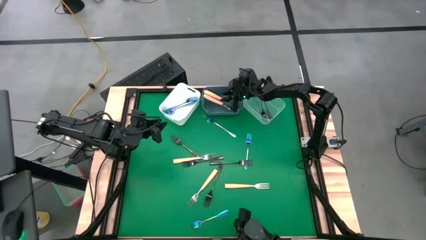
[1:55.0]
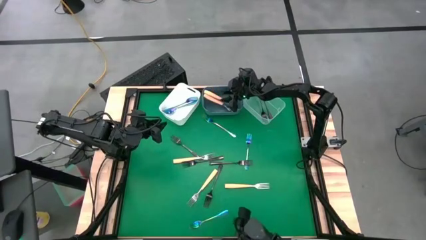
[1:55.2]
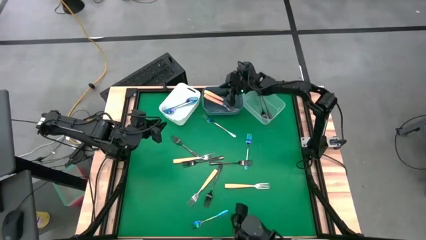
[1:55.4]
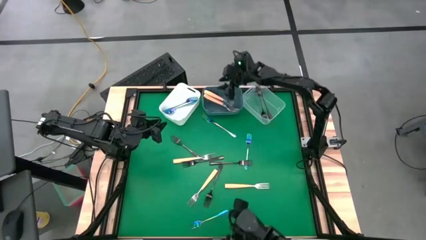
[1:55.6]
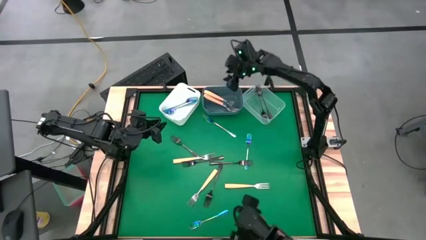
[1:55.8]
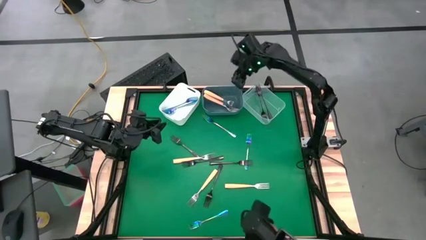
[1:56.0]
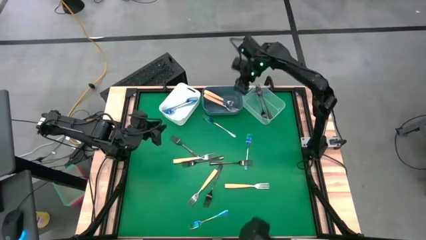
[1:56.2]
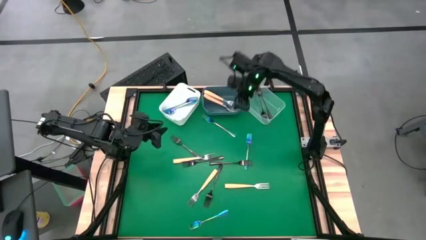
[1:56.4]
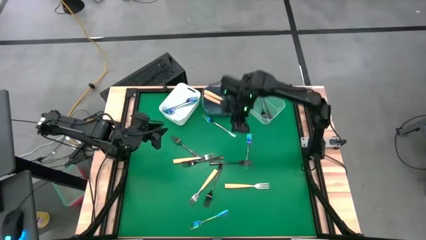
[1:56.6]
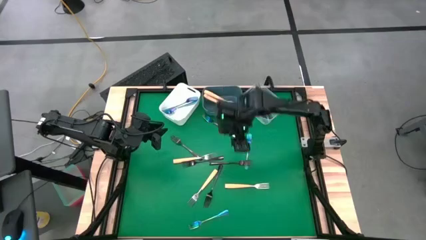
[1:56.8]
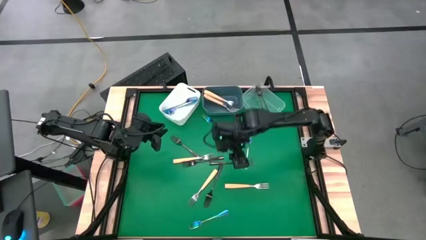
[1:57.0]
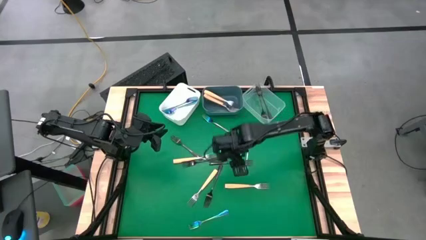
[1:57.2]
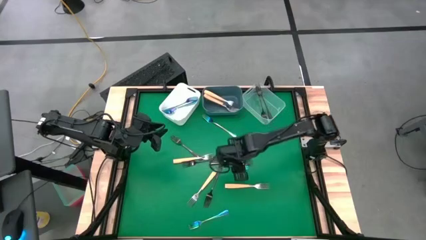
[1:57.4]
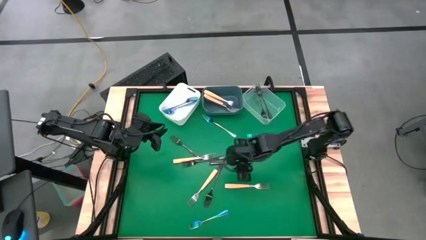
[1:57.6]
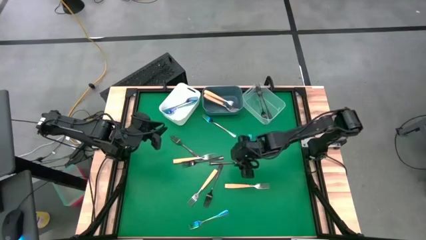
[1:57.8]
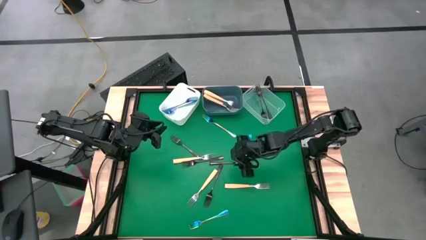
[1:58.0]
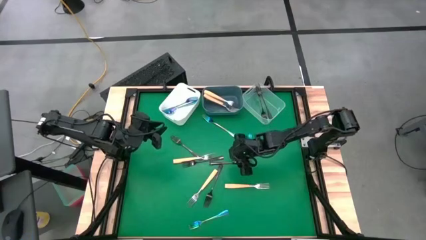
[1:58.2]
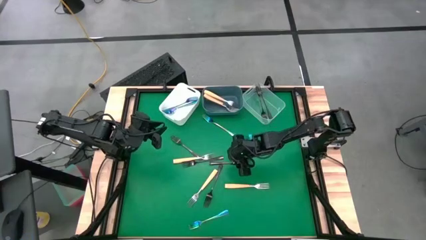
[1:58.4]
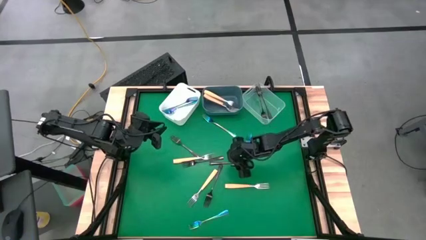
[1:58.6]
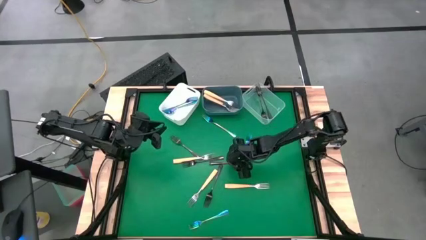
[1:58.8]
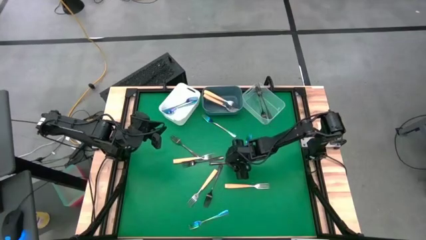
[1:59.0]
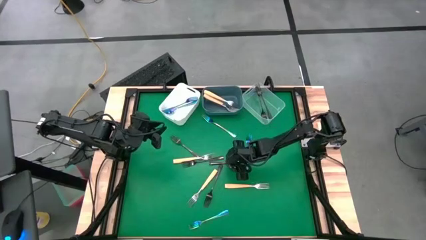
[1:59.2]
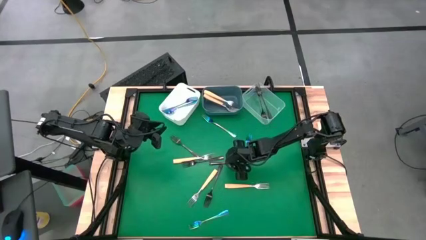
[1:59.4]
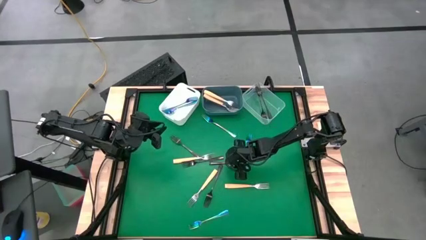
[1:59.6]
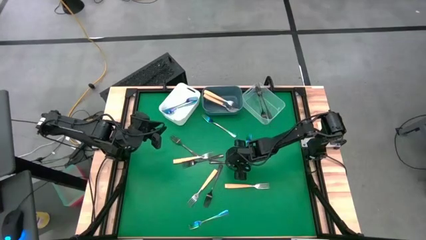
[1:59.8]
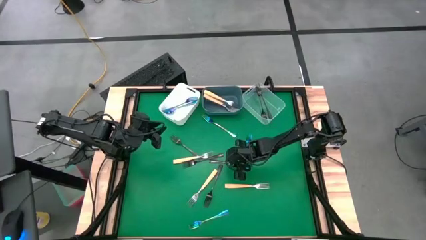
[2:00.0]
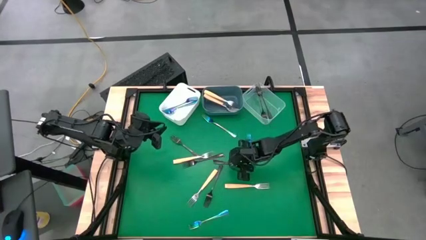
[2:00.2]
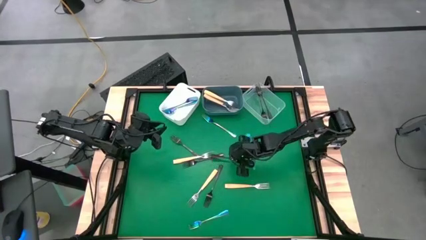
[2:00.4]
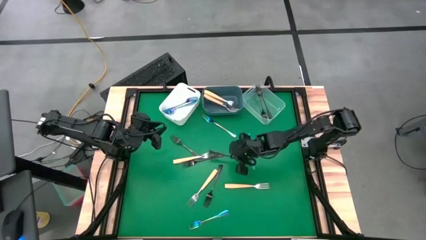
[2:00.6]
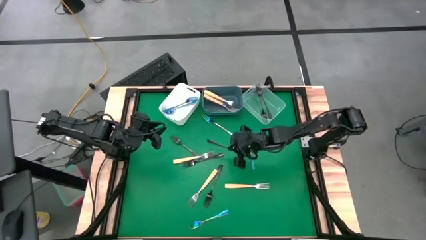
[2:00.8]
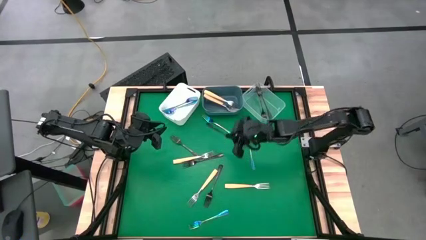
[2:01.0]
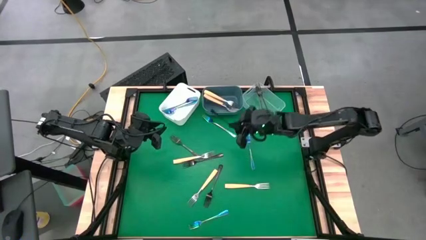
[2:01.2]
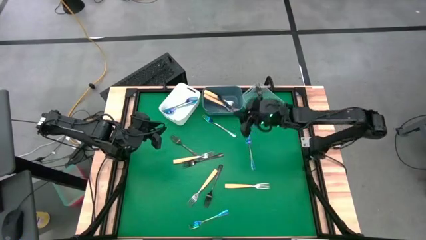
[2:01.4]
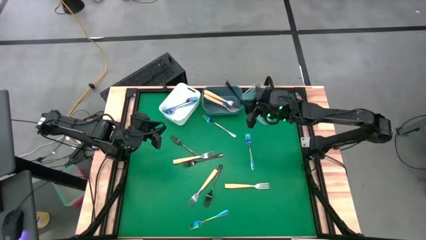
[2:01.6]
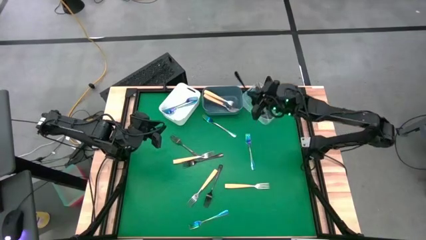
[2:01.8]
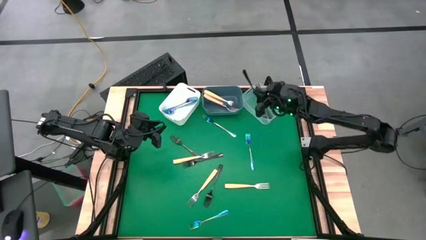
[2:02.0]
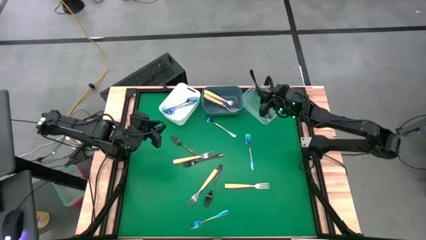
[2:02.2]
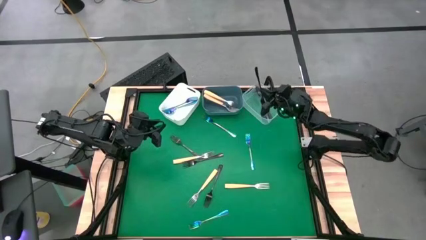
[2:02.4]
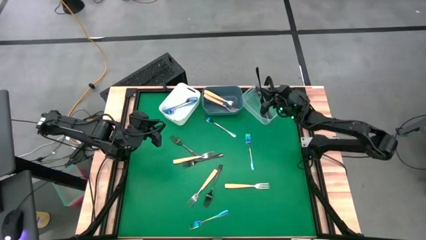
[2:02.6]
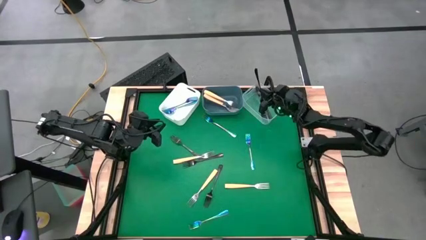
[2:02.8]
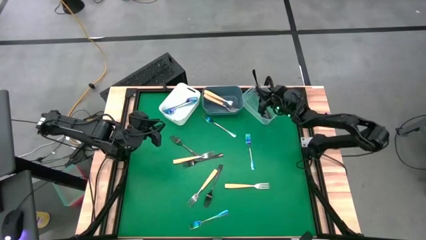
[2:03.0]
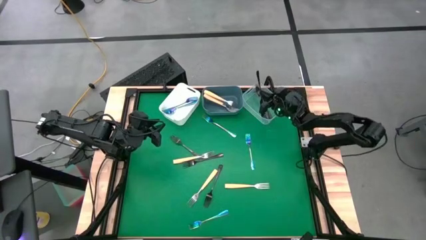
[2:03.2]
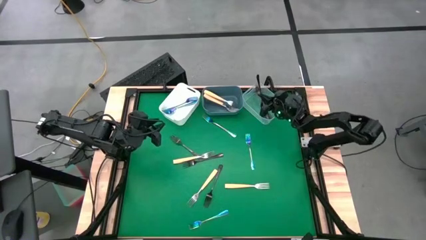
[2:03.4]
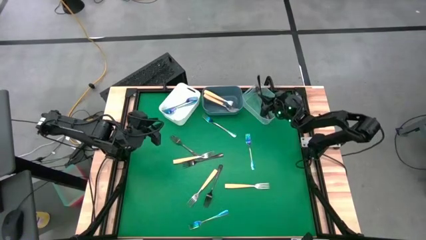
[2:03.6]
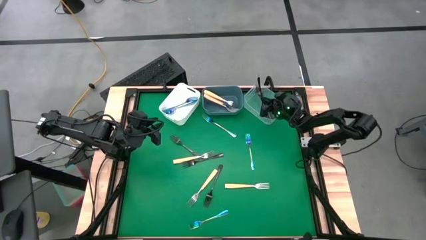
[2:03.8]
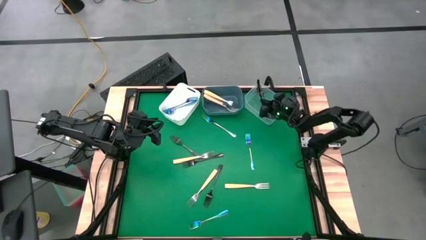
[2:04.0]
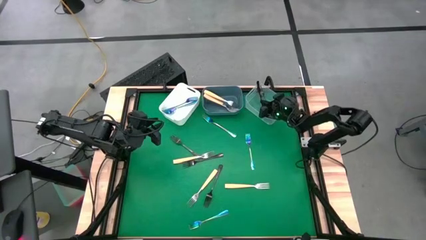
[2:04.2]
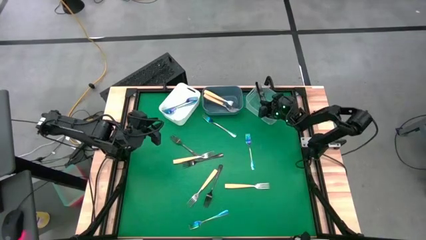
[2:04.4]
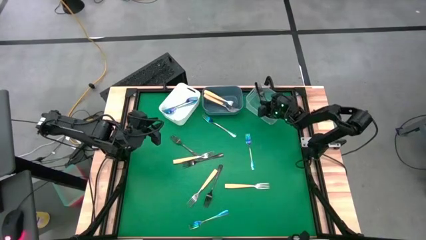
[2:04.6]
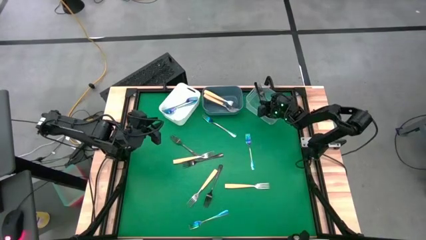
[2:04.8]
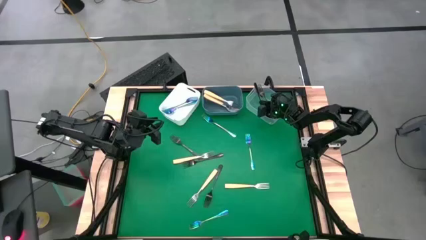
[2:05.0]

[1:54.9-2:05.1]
Task: Sort silverware by color (type)
Put the black fork into the transparent bin

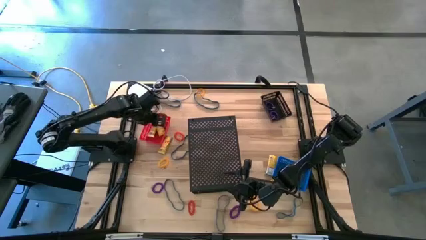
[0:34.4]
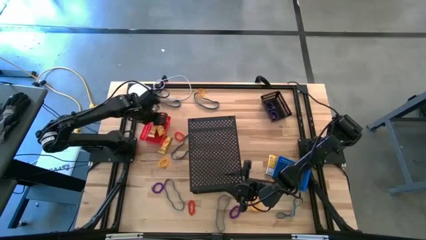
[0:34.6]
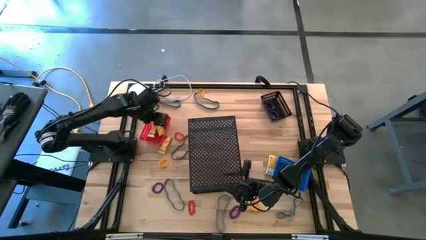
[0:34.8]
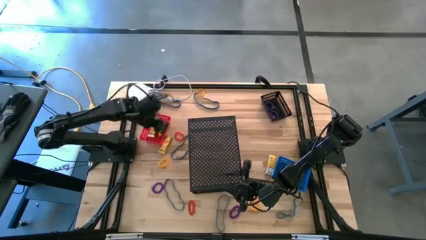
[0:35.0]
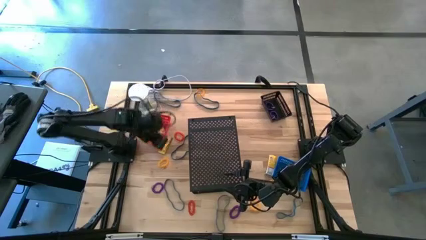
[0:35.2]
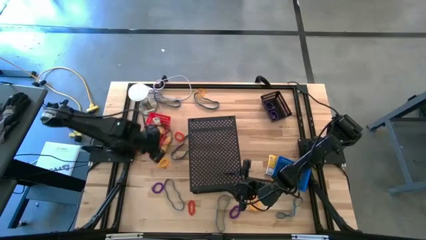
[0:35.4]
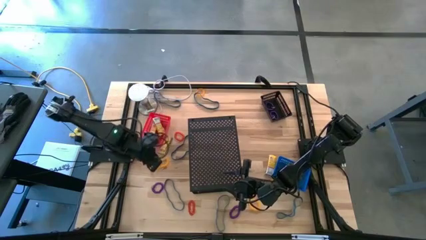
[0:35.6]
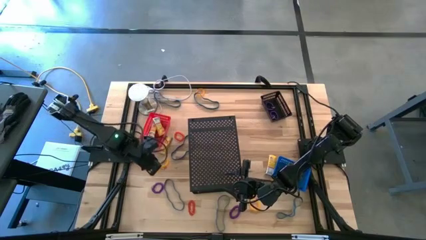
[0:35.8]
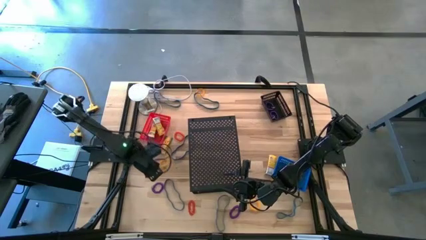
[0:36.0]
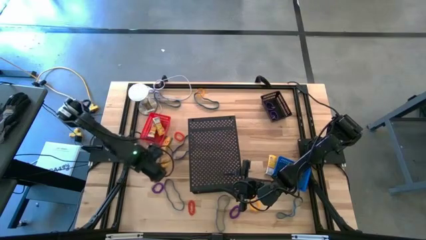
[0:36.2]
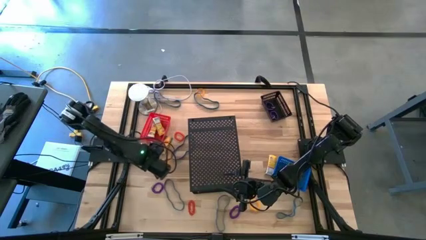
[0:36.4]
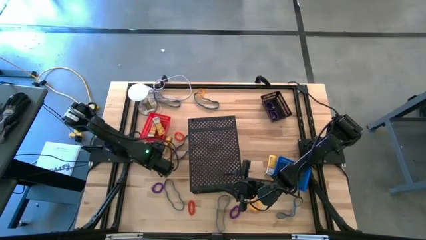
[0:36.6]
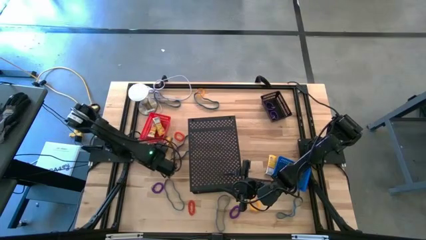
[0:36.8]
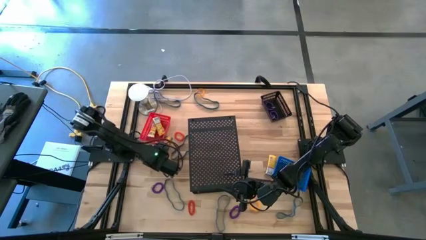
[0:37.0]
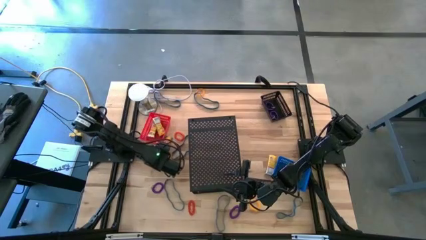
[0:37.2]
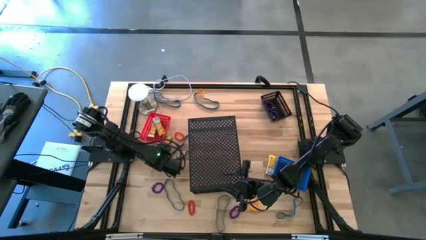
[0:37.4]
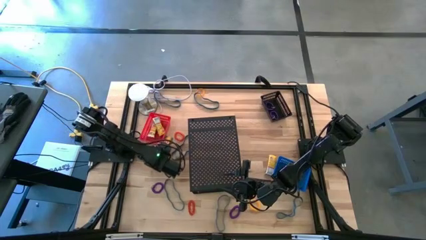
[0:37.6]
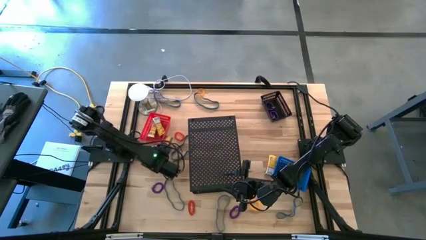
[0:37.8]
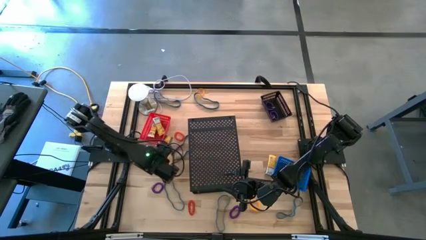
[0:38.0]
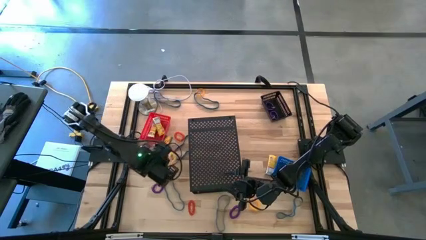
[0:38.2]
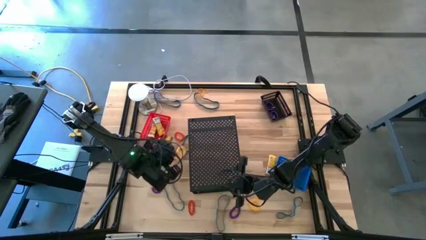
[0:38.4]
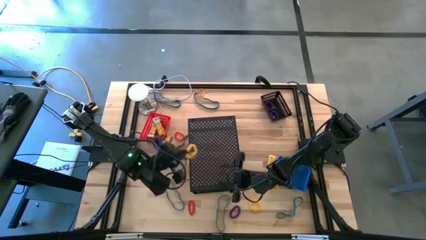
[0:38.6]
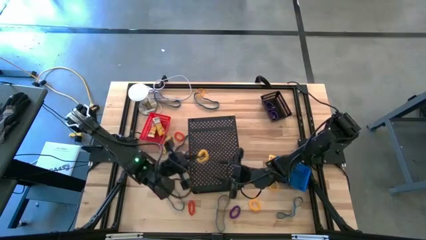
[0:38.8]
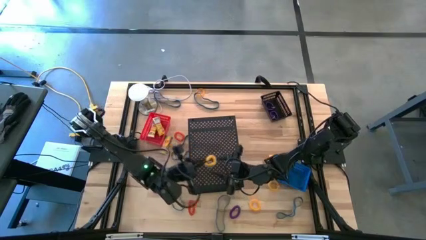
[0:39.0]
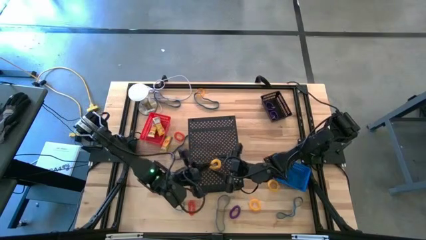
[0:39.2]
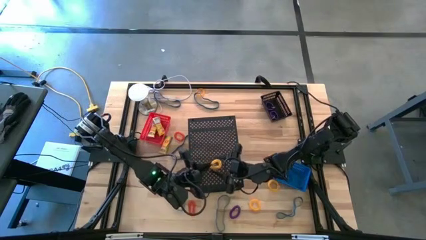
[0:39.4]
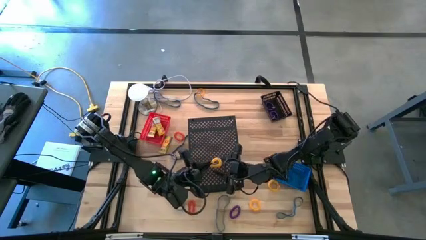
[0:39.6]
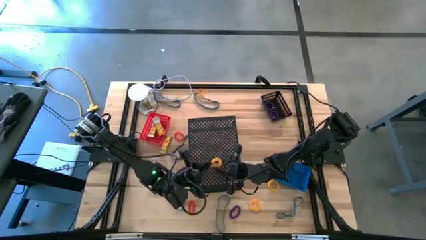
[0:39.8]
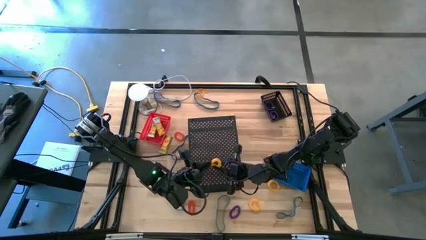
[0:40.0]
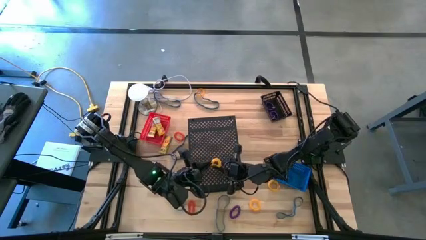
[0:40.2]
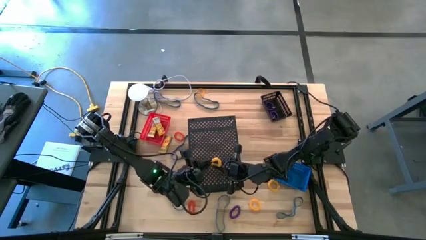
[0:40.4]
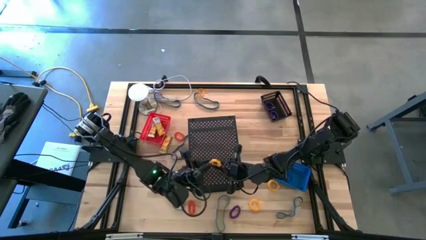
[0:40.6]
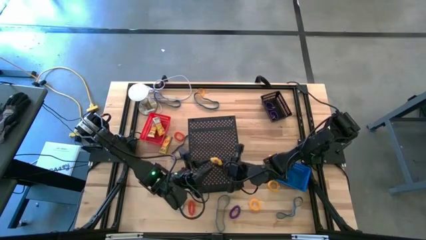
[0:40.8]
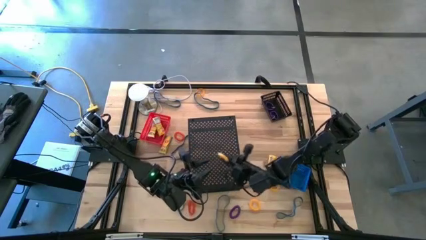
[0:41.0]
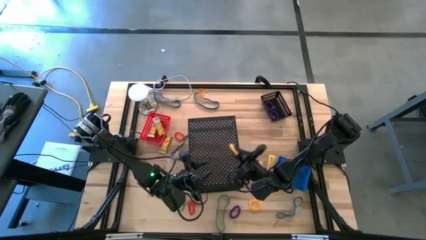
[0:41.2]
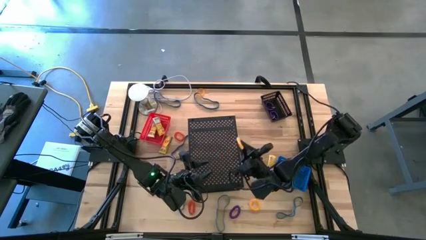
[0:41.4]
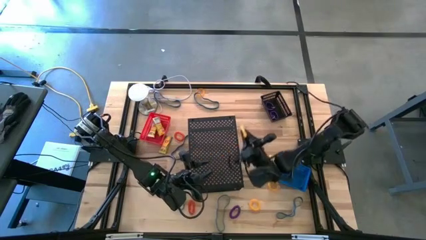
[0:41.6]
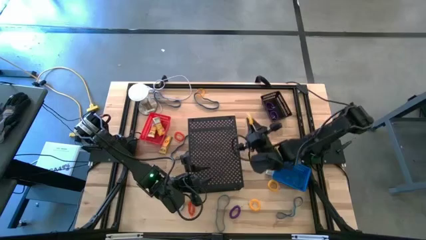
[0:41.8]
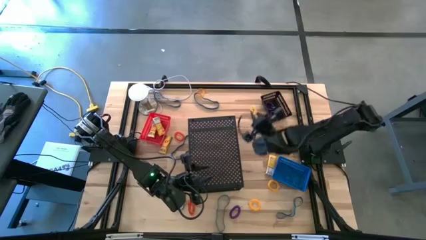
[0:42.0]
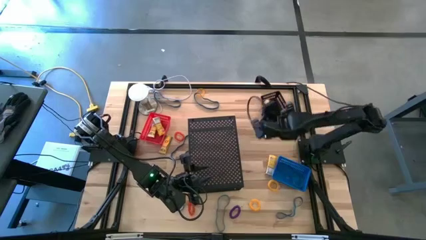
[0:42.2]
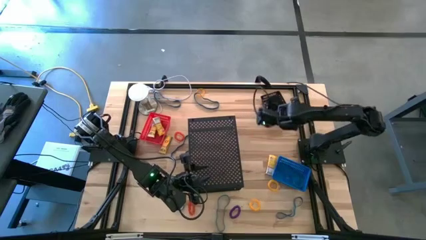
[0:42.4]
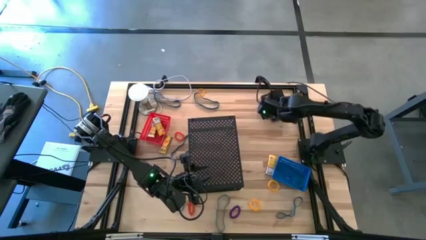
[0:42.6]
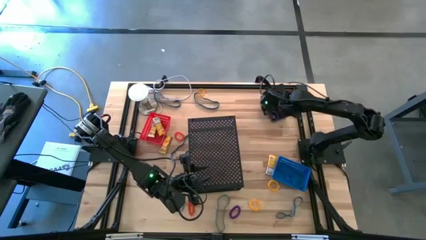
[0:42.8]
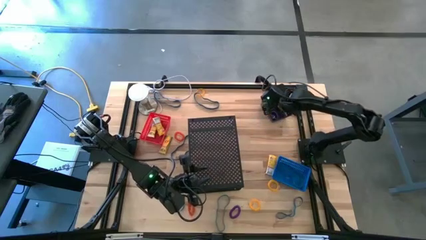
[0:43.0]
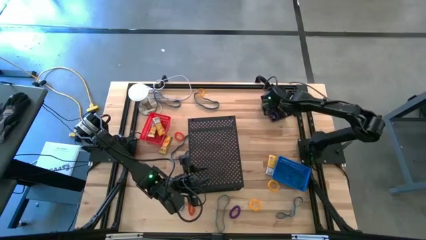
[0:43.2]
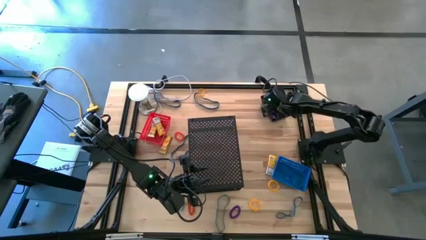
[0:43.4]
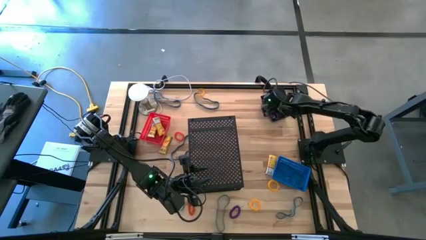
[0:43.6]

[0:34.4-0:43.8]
Task: Pick & Place Office Desk Supplies
Put the yellow spring keychain into the black bin
